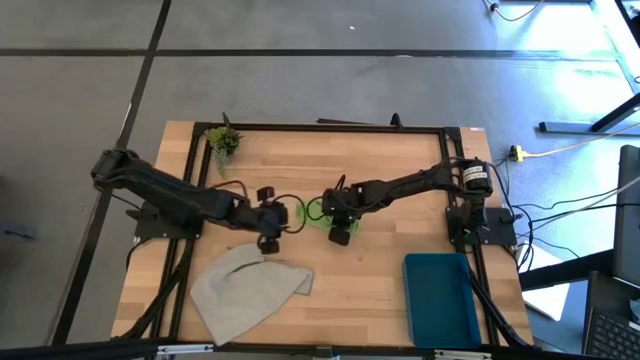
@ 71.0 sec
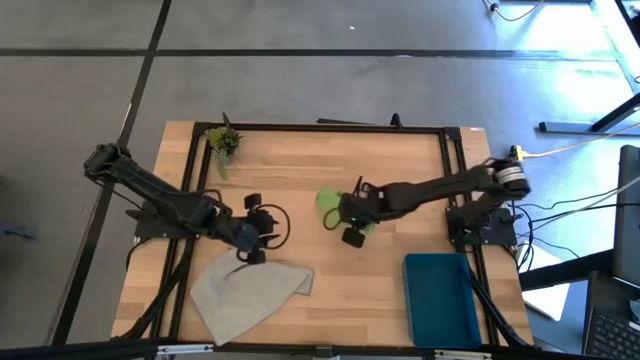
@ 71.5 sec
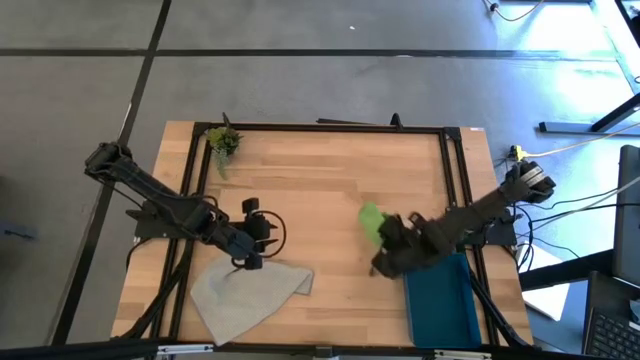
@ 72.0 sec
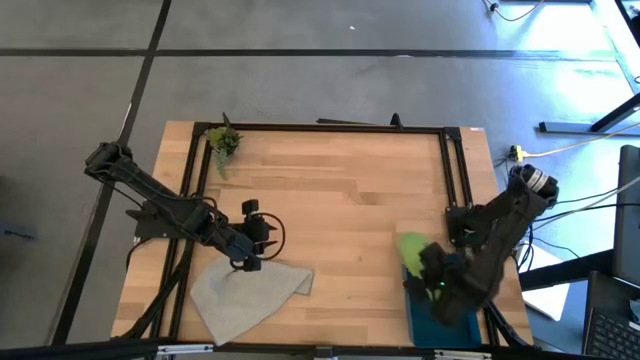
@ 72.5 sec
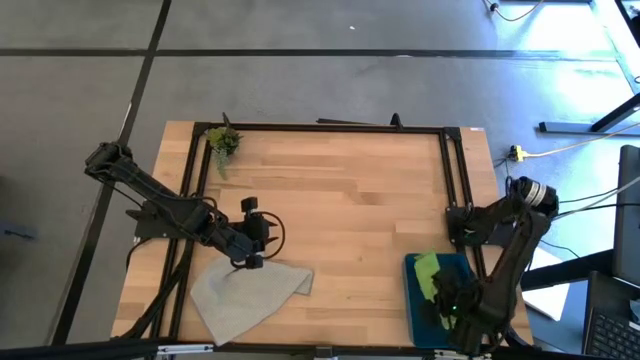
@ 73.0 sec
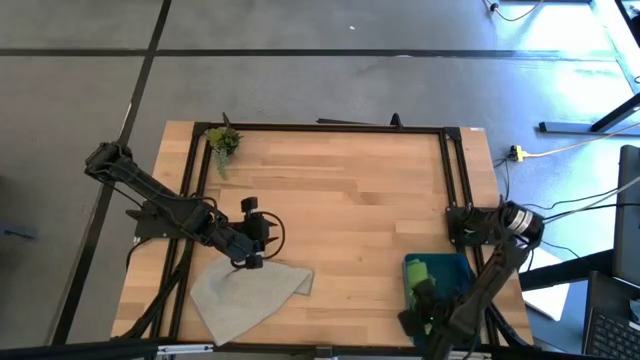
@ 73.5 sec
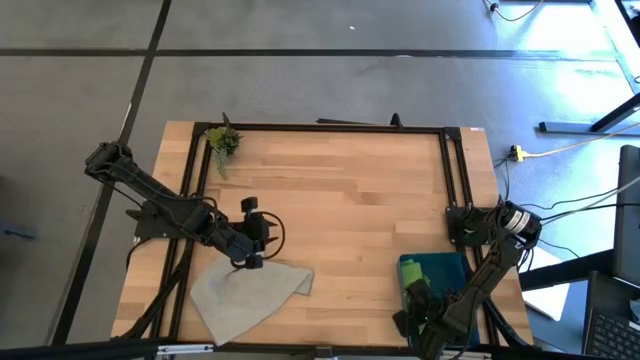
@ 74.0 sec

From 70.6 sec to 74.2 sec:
Task: Roll microfiber towels into tight, uniform cylinder then place into a basket
Put the folded green microfiber cloth into the bin

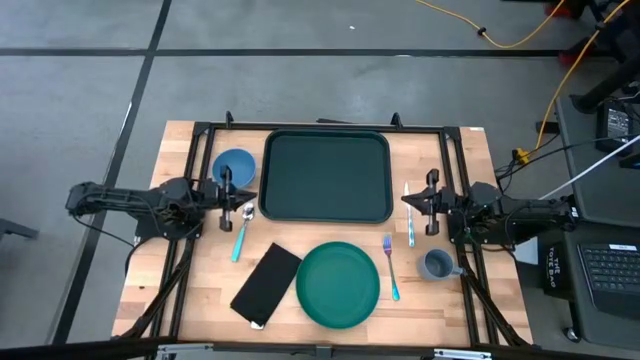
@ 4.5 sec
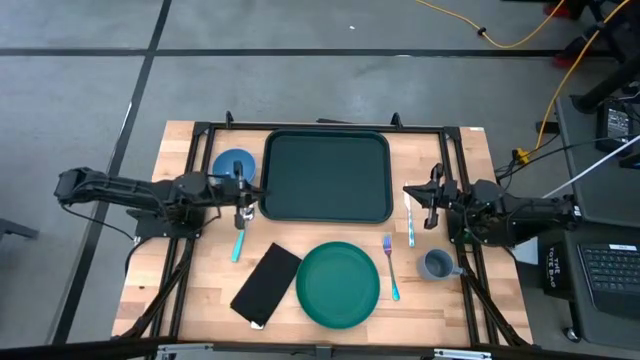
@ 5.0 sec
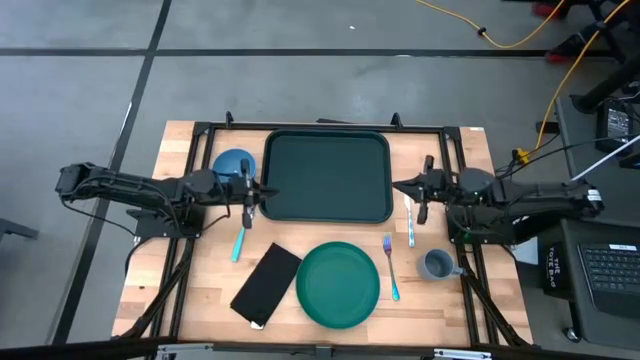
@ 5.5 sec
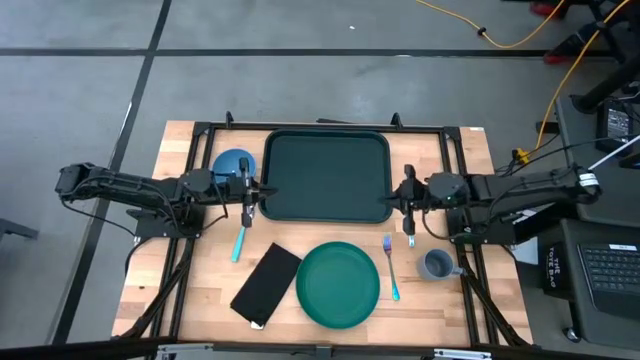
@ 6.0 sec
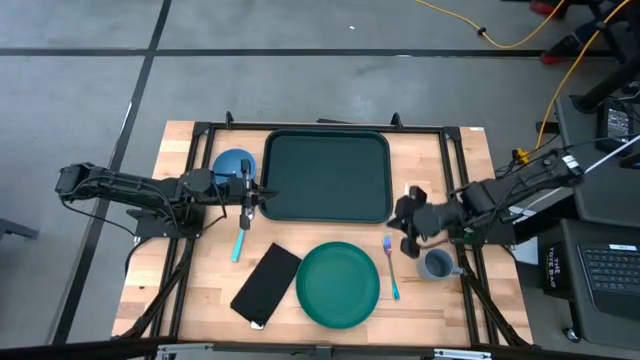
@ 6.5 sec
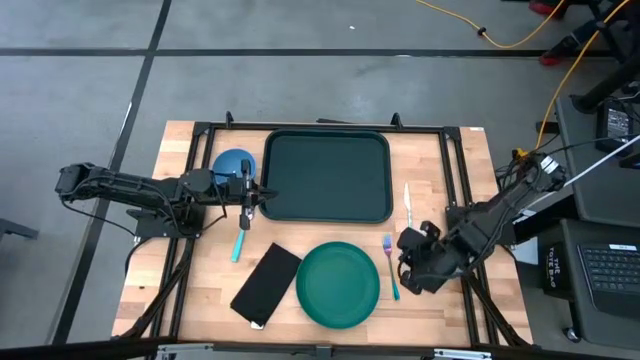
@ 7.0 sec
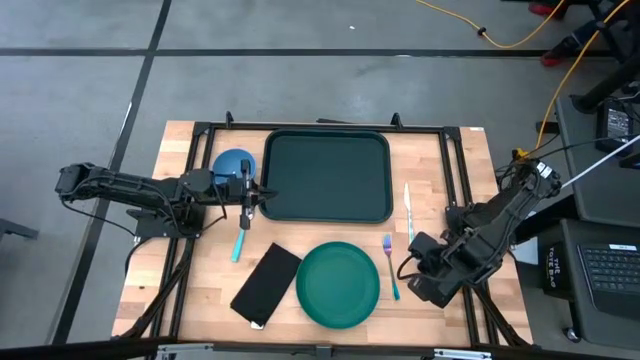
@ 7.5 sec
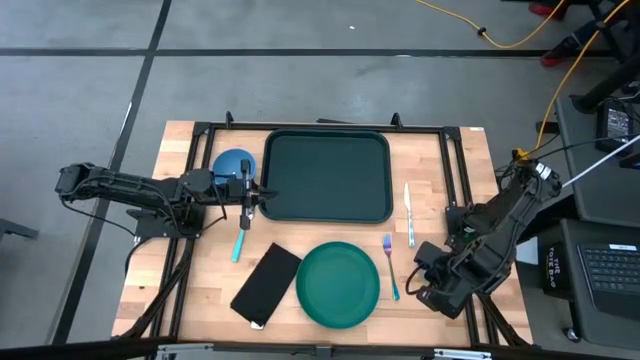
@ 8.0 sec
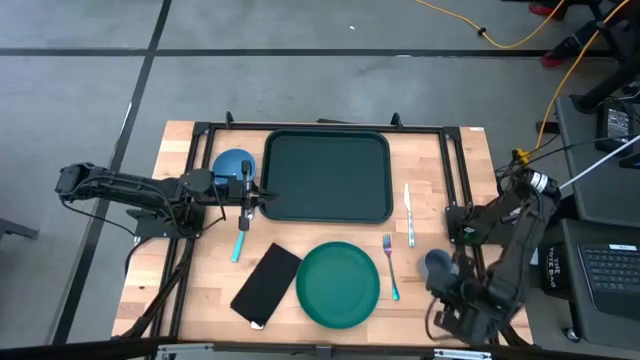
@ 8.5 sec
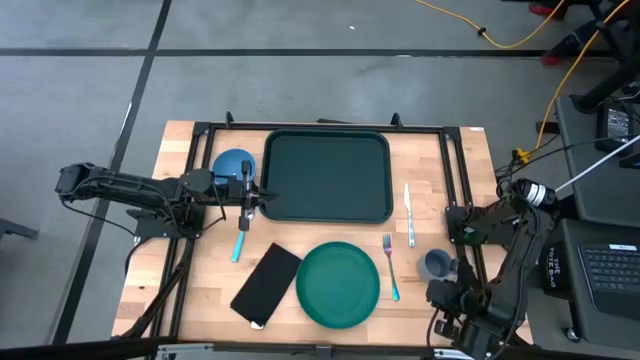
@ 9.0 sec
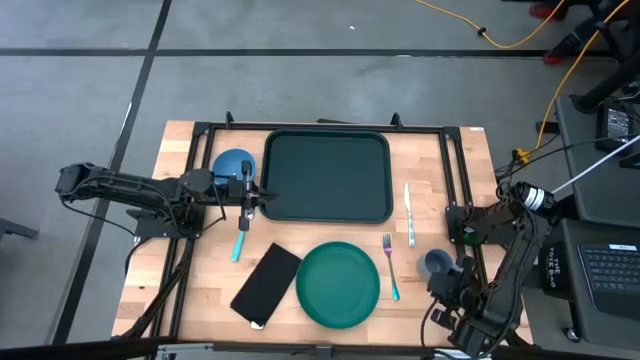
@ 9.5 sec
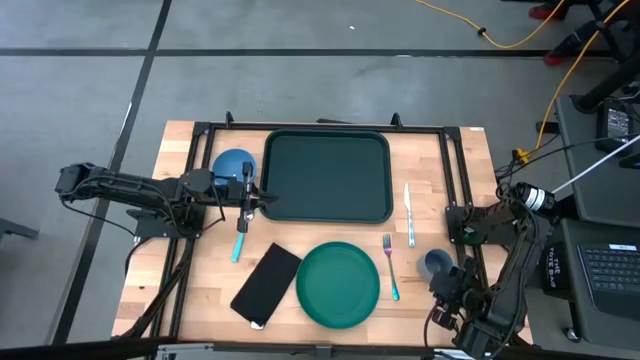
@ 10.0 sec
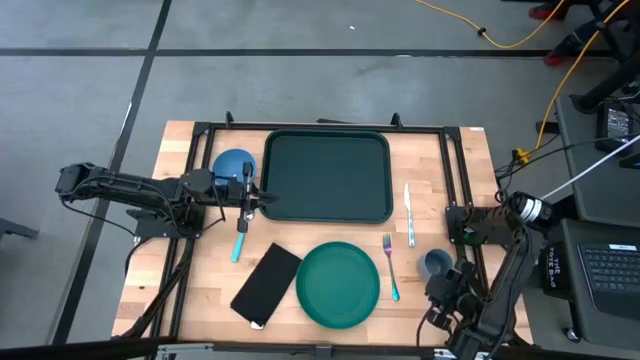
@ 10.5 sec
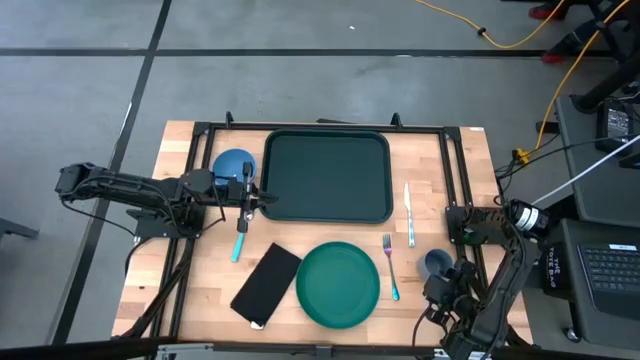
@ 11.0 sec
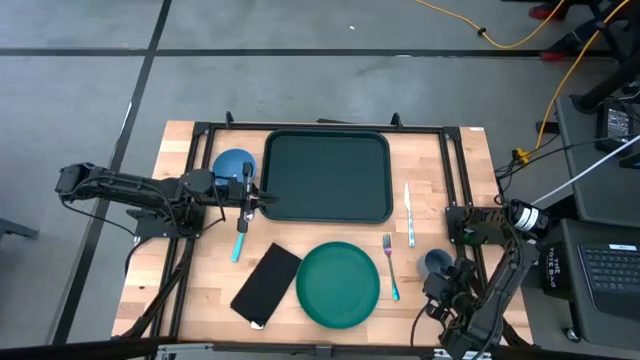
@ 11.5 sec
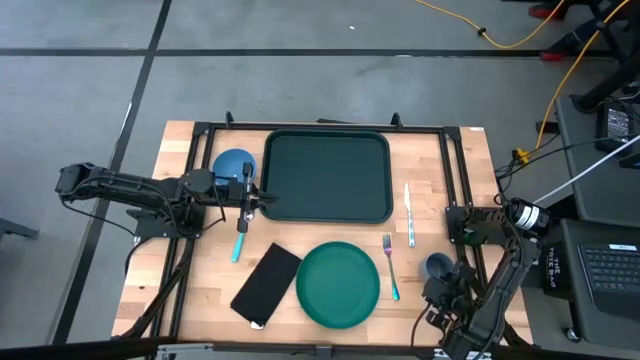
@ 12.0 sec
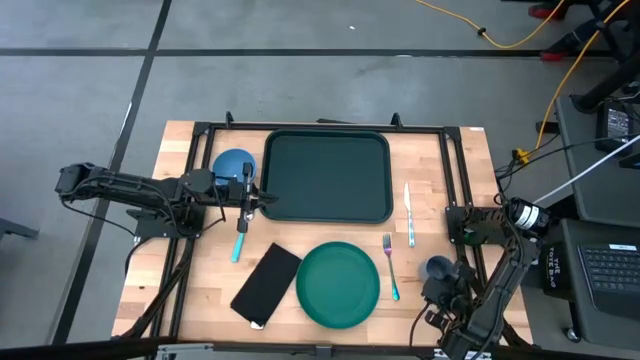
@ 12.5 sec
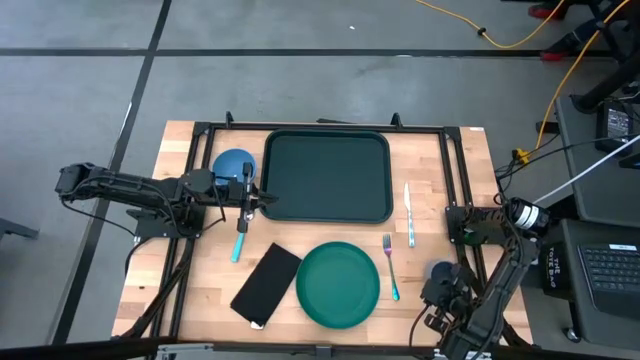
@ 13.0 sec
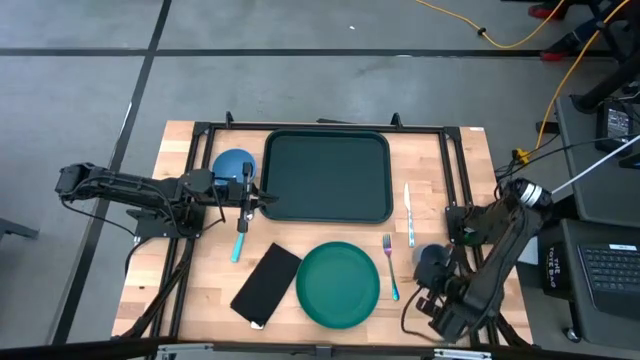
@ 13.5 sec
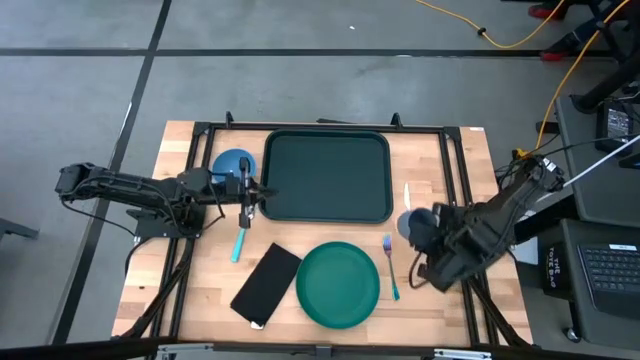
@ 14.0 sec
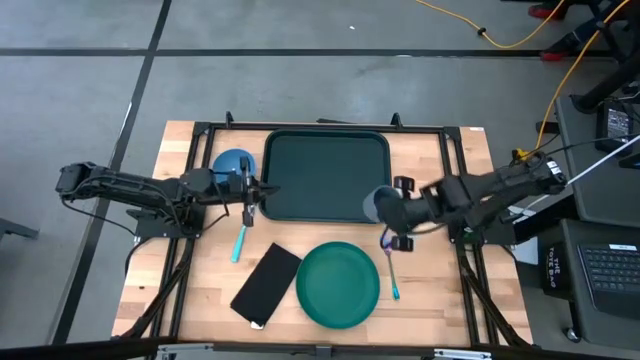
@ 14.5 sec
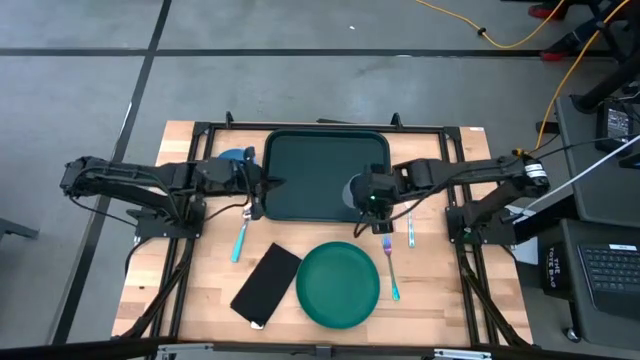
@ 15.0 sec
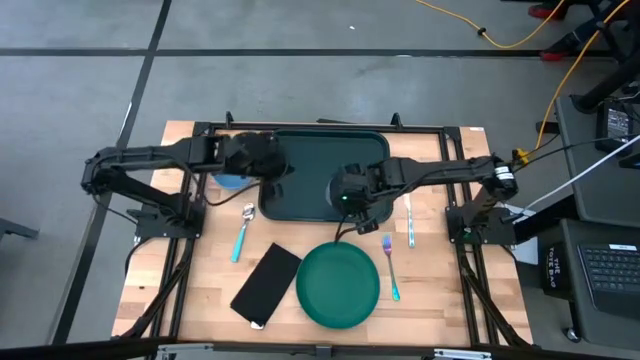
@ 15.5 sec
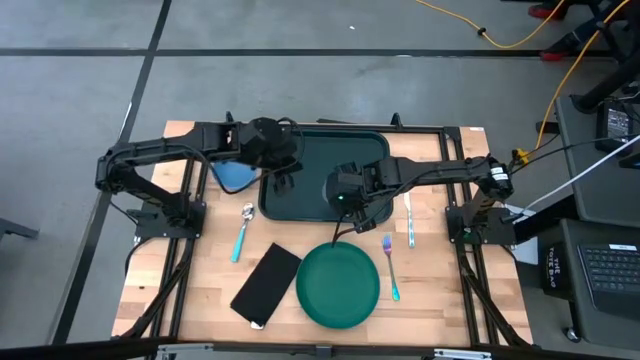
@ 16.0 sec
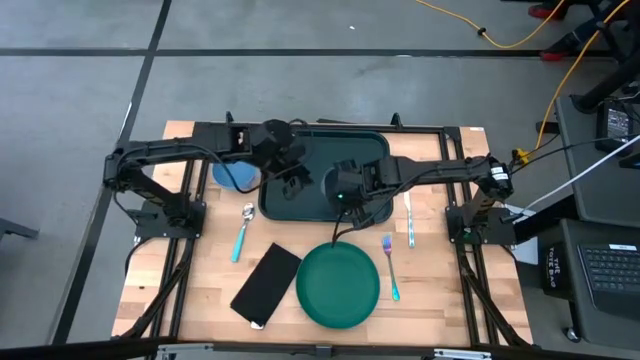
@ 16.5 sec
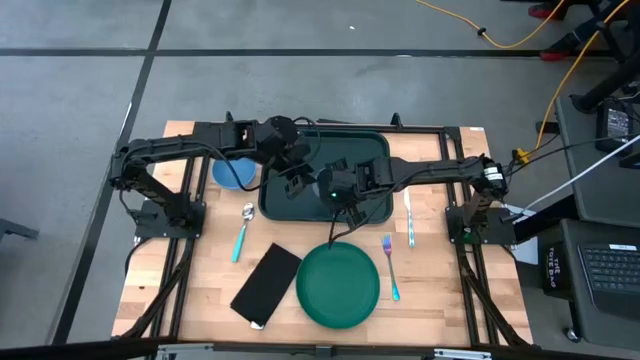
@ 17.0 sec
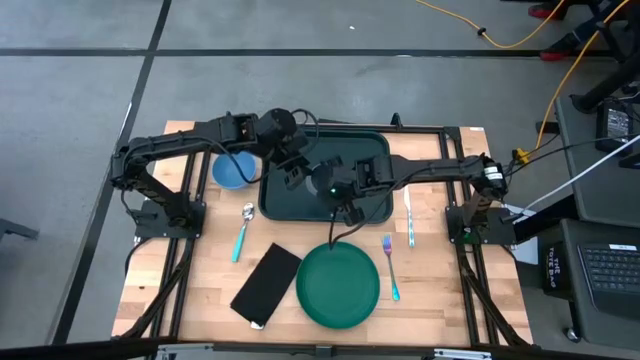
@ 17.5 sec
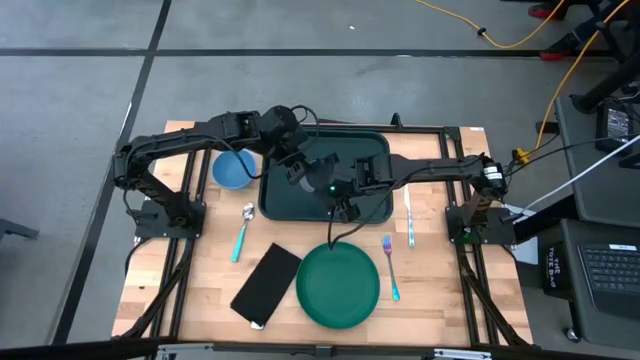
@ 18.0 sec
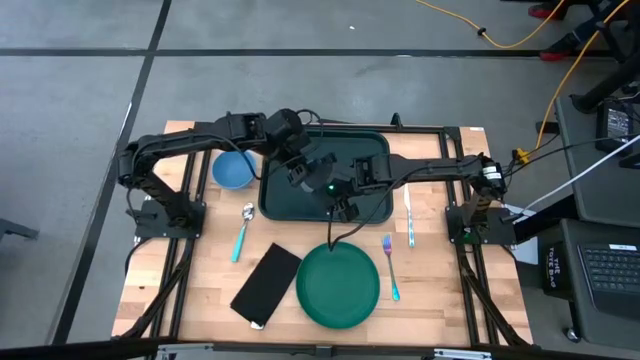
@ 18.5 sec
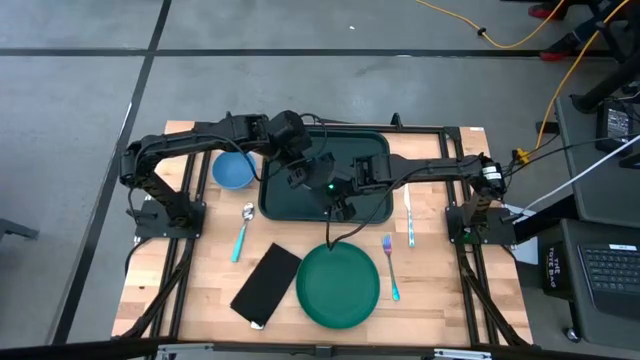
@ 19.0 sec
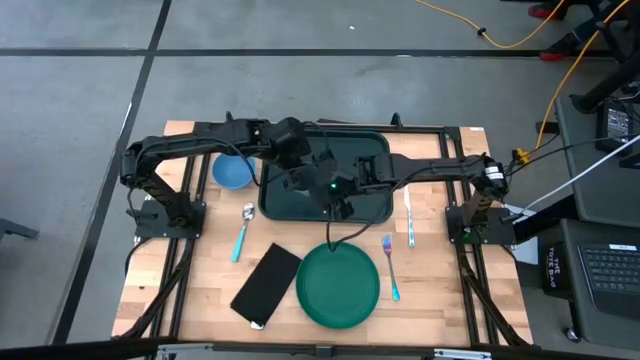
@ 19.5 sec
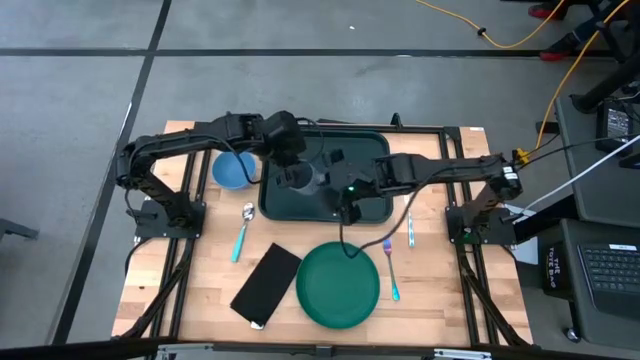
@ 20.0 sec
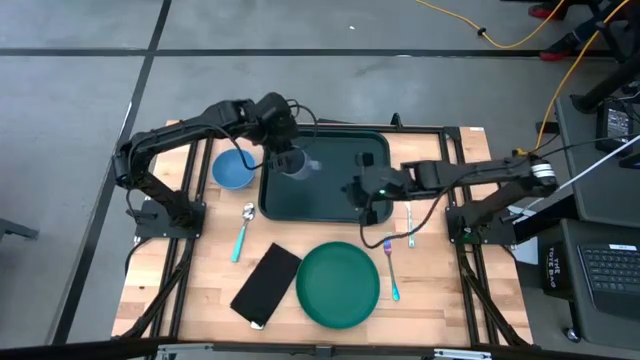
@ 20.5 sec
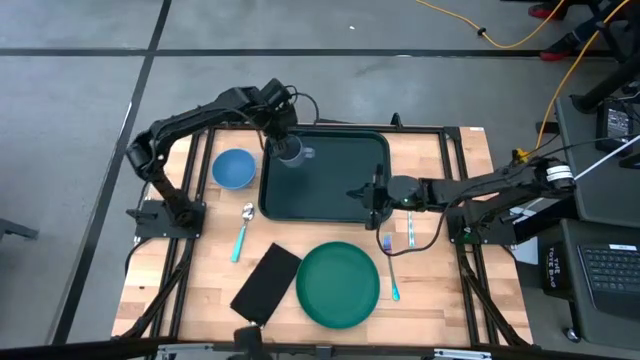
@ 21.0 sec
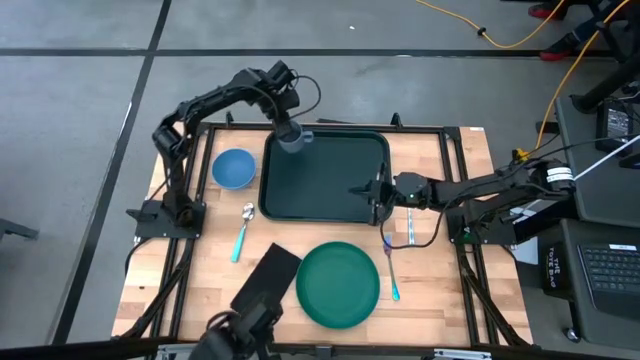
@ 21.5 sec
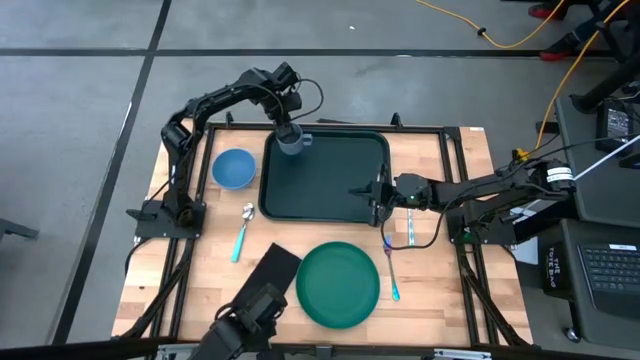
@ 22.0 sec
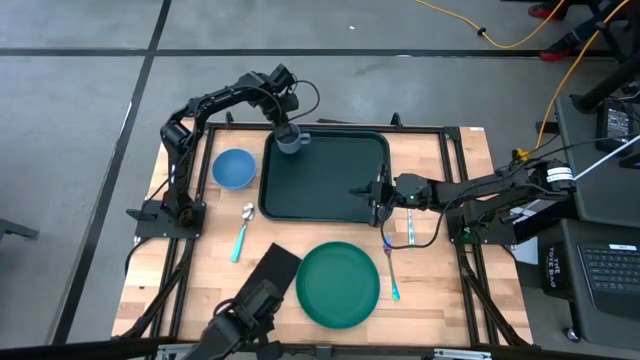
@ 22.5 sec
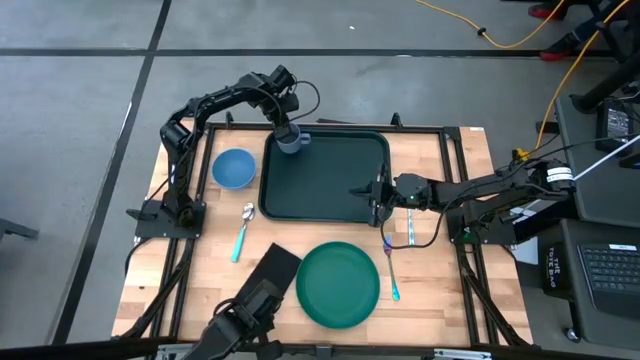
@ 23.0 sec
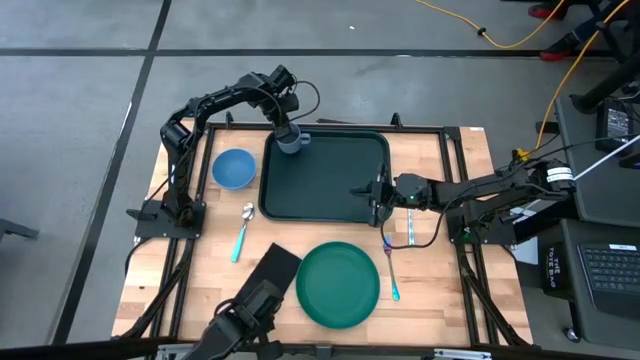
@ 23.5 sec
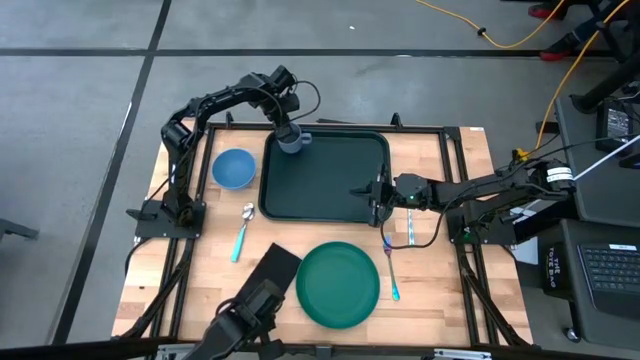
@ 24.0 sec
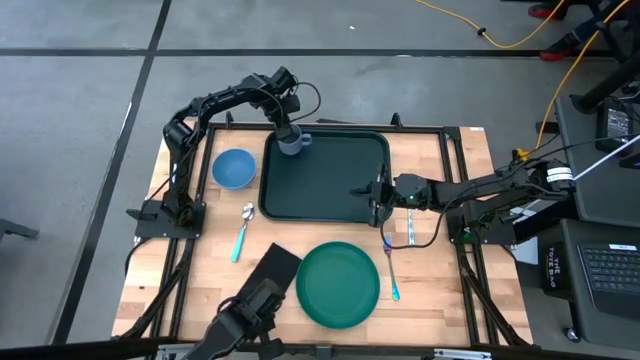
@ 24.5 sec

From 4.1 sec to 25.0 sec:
Task: Set up tray
Put the blue mug on the black tray
